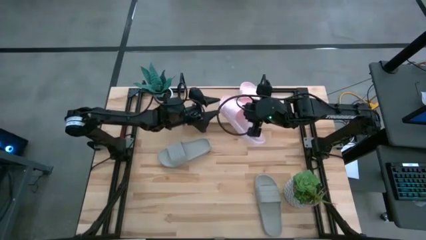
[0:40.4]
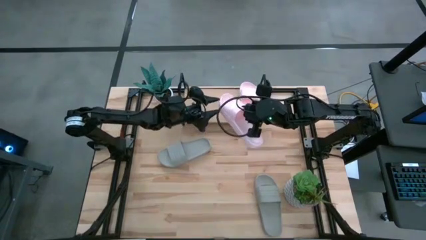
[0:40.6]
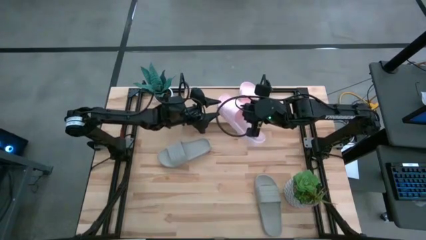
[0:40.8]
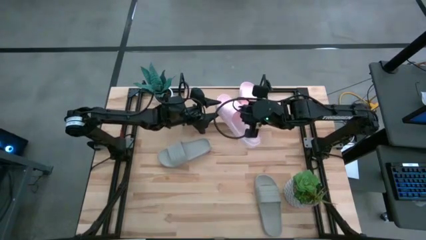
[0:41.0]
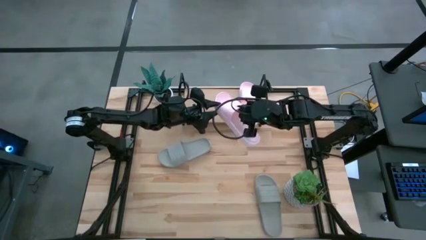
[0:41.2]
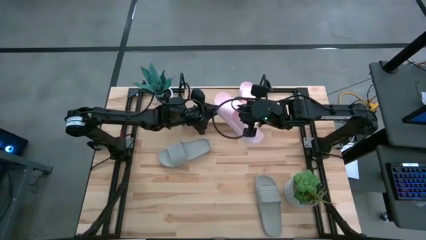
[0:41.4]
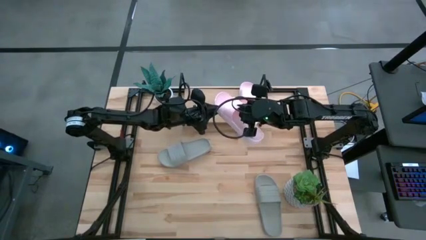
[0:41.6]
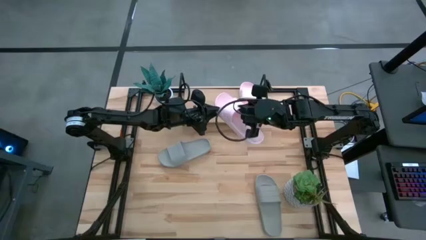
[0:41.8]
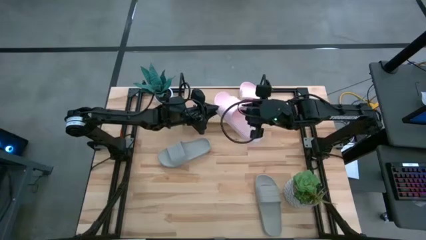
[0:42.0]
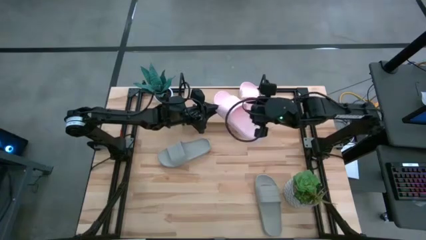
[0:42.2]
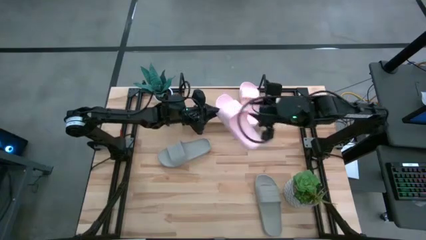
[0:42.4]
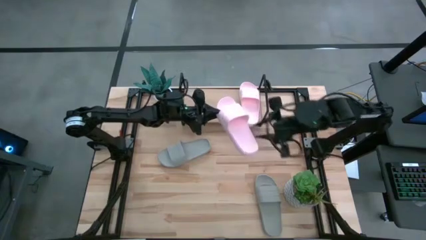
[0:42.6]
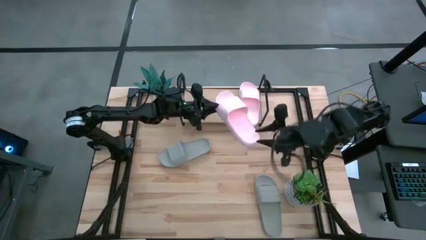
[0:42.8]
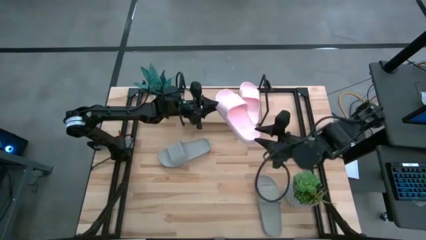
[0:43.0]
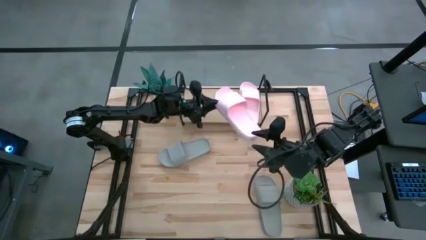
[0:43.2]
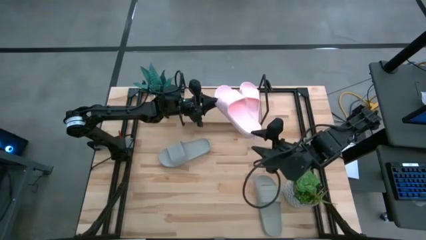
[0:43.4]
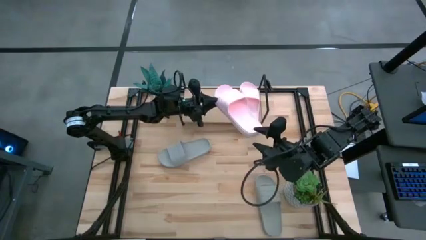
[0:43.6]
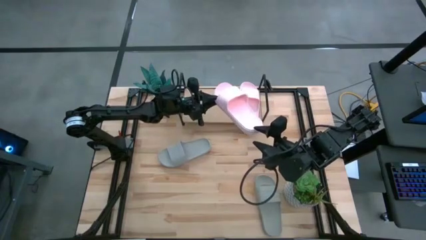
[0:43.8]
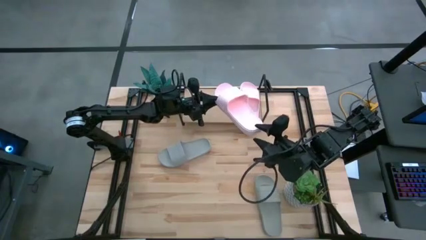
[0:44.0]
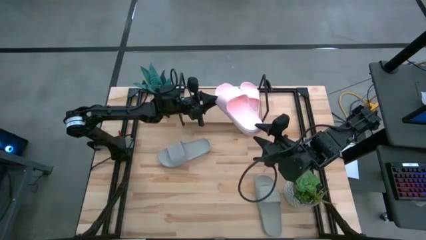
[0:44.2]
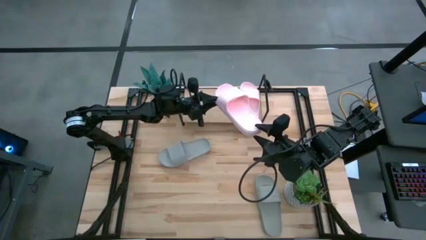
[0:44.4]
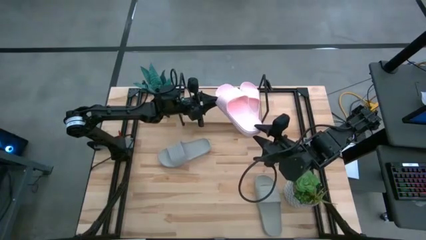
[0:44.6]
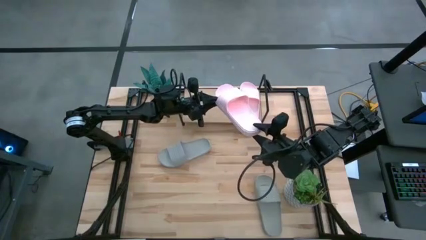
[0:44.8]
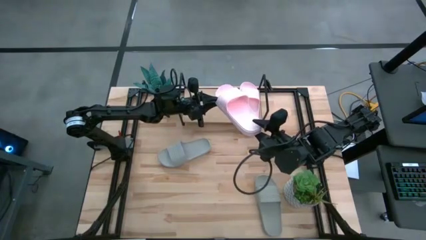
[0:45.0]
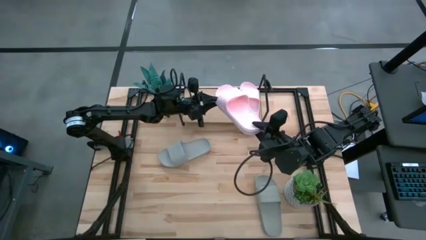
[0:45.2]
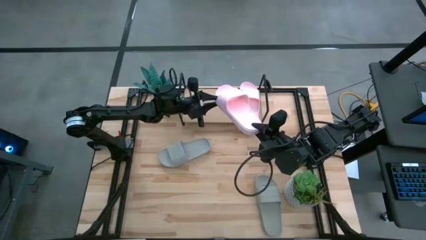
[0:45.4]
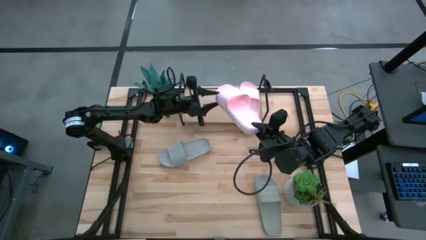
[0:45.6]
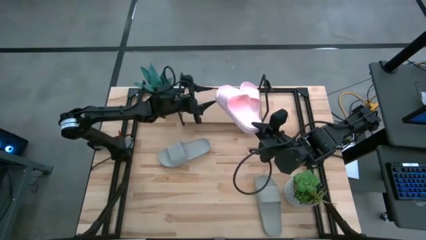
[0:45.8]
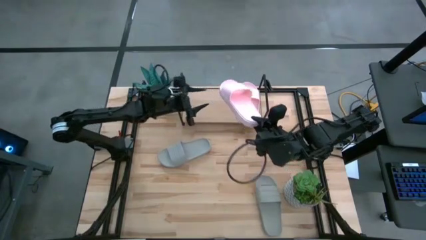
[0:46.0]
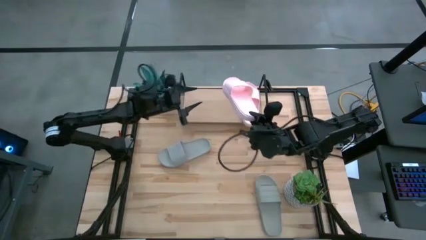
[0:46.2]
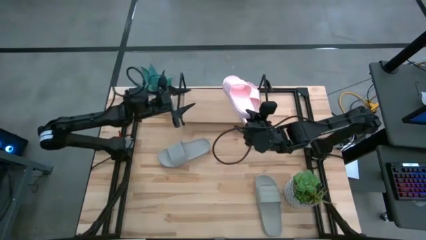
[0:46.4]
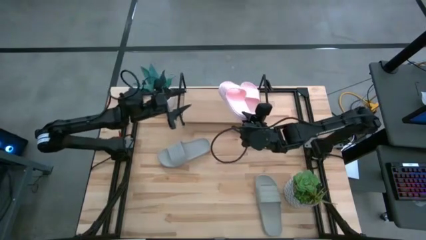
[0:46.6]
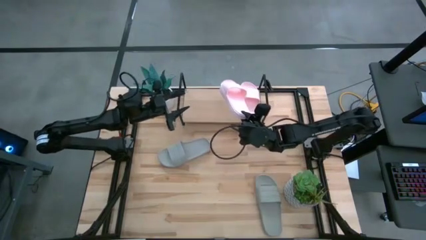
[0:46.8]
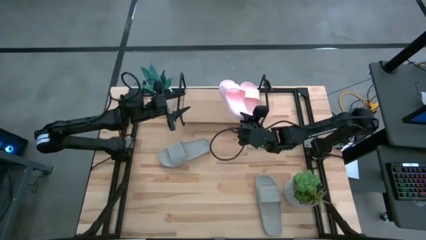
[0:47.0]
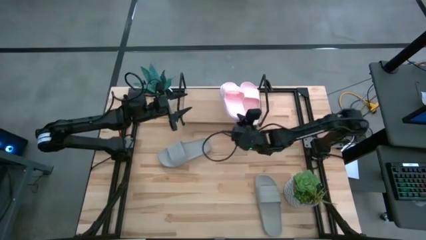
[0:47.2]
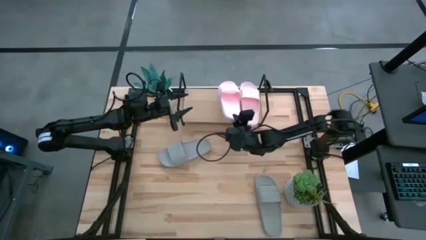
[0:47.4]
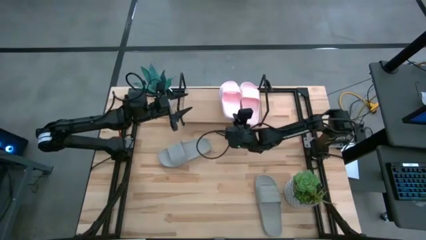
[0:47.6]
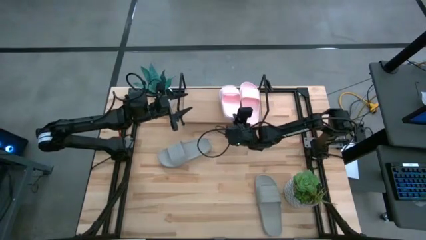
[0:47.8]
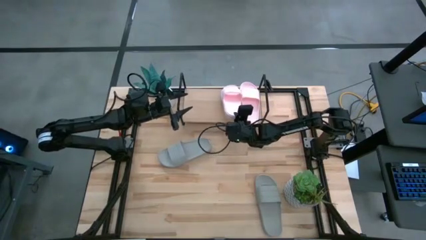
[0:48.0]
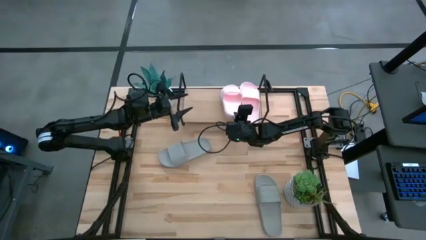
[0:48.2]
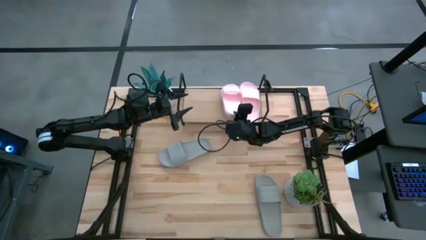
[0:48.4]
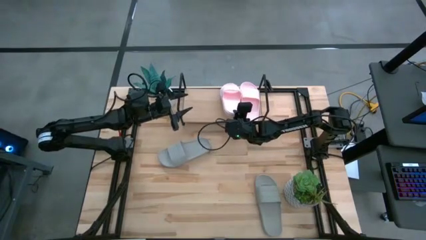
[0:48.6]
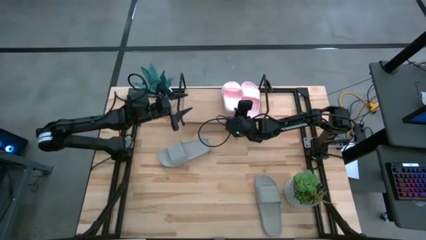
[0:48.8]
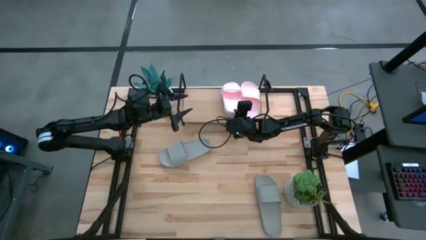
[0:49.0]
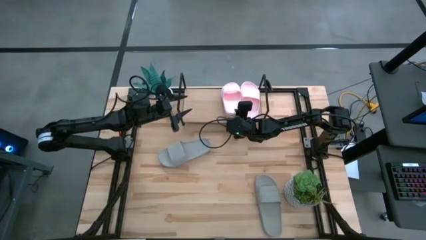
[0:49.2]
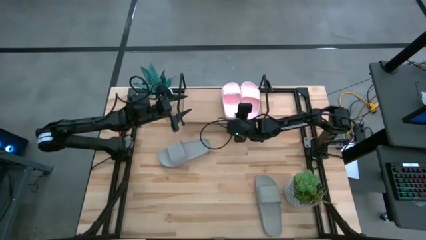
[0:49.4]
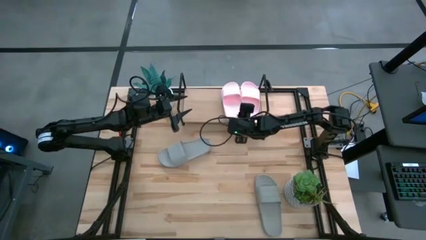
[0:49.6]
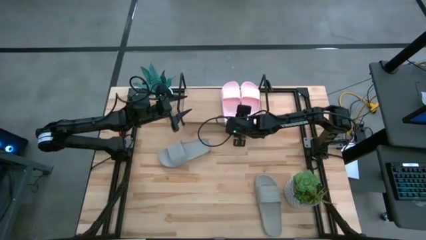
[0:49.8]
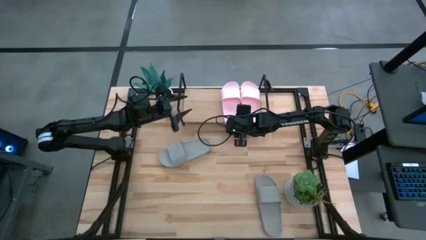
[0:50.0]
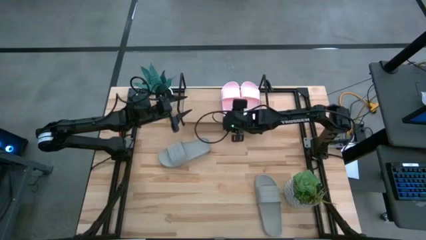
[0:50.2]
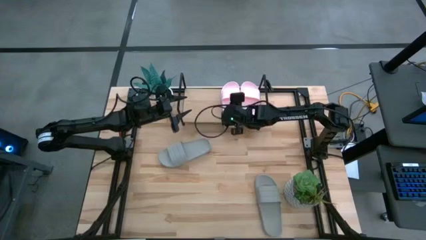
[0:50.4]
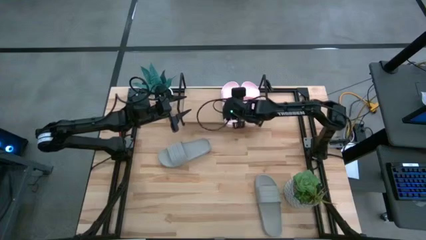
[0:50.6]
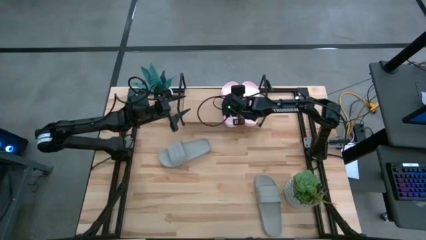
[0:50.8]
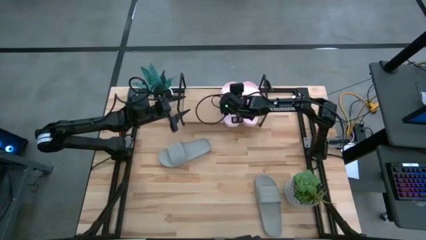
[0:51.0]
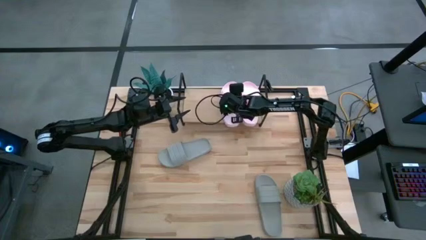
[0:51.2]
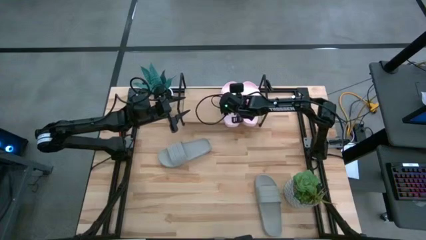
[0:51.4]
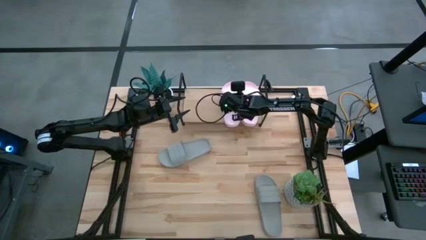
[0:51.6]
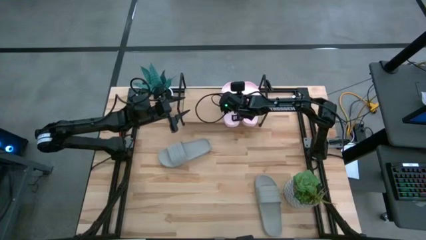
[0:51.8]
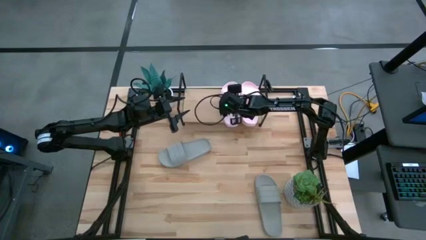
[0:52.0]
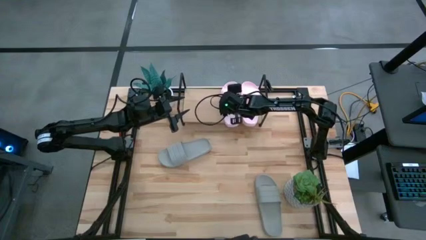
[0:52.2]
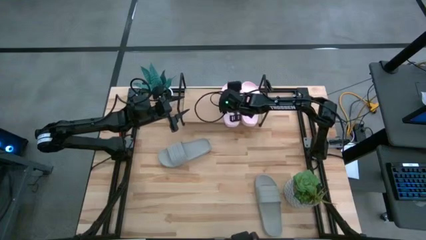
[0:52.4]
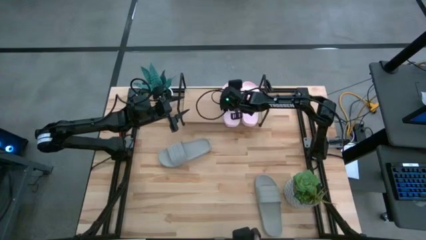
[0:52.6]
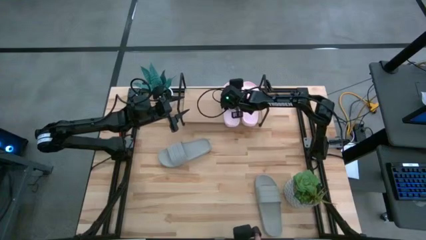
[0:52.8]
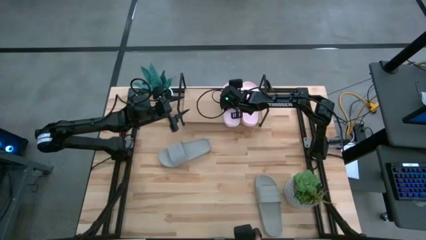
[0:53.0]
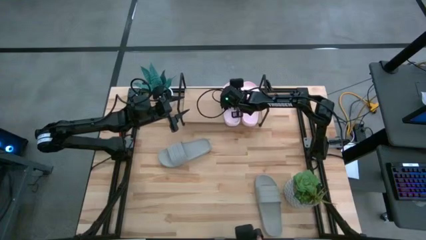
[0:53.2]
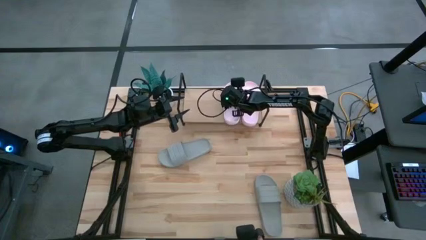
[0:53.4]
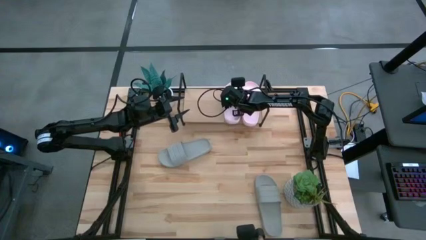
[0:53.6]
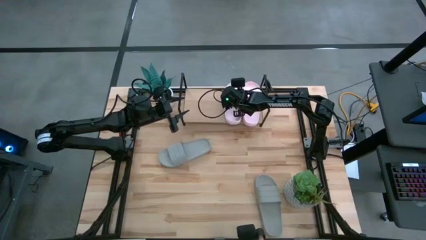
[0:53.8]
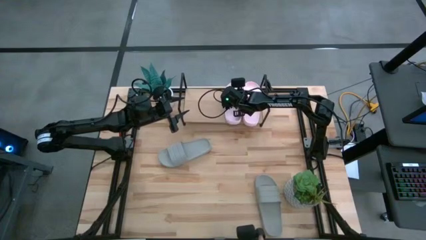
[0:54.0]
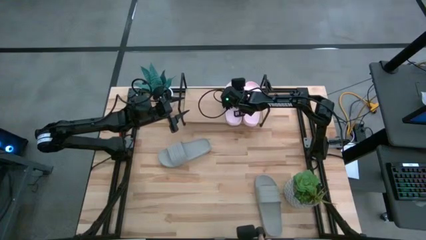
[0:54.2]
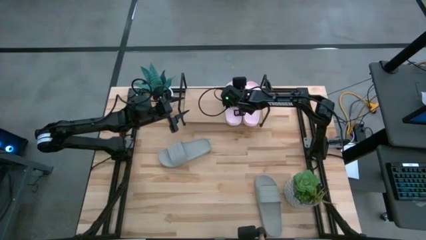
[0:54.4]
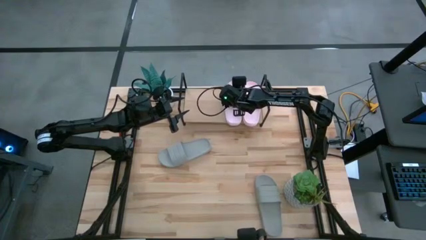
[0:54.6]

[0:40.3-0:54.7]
Task: Pick and place slides into the shelf
Put the pink slide on the shelf
